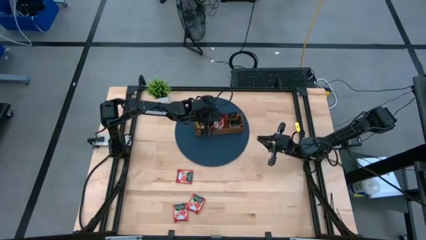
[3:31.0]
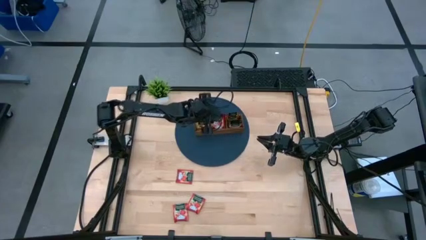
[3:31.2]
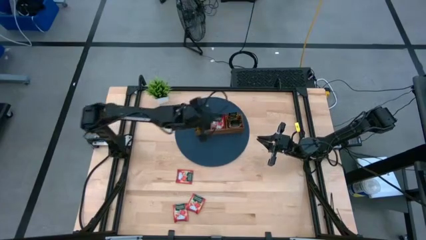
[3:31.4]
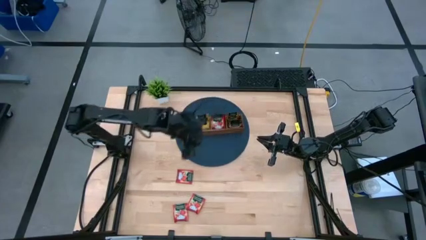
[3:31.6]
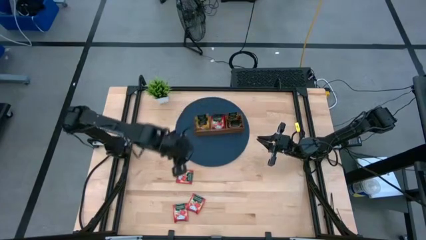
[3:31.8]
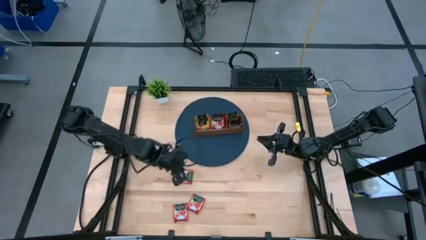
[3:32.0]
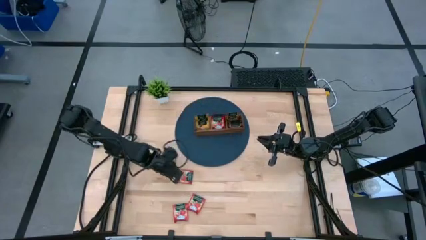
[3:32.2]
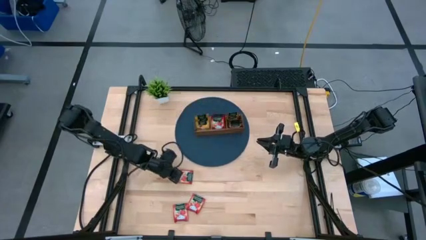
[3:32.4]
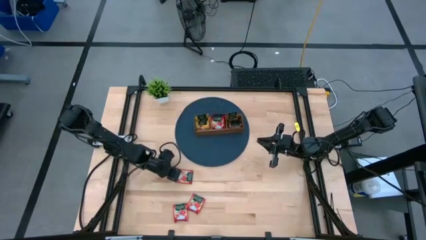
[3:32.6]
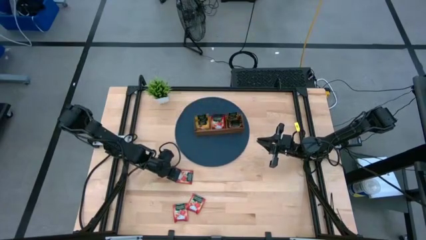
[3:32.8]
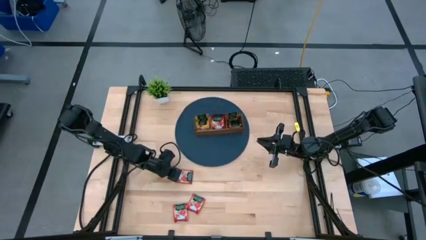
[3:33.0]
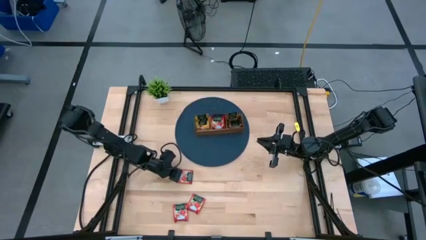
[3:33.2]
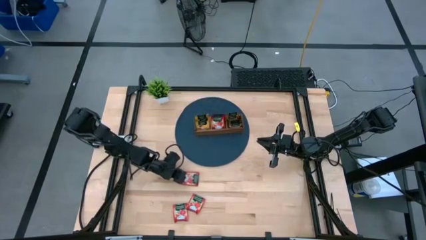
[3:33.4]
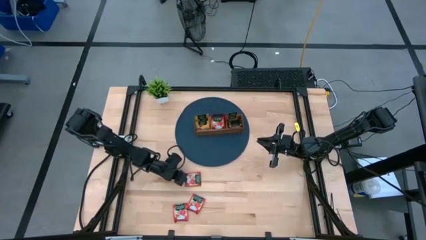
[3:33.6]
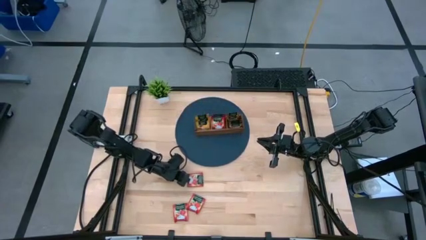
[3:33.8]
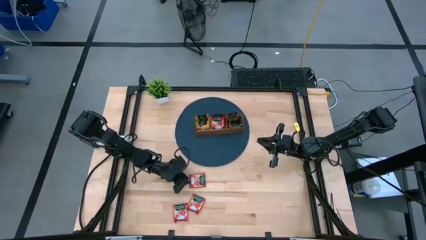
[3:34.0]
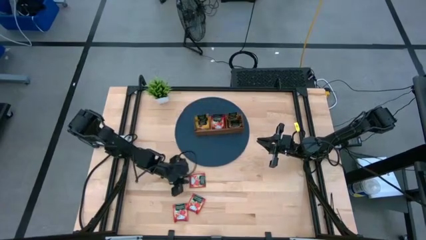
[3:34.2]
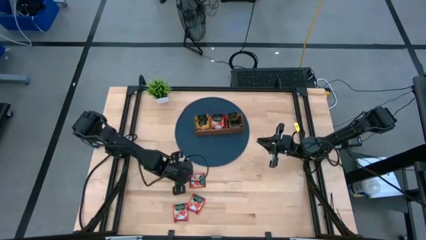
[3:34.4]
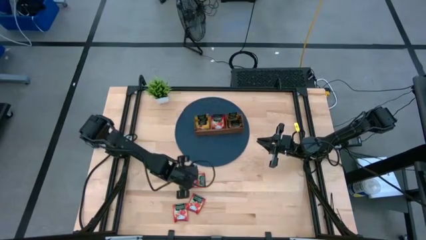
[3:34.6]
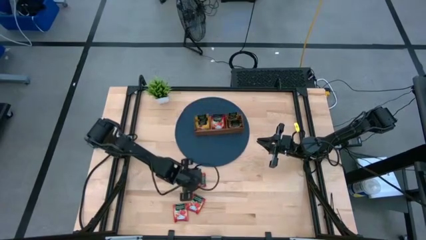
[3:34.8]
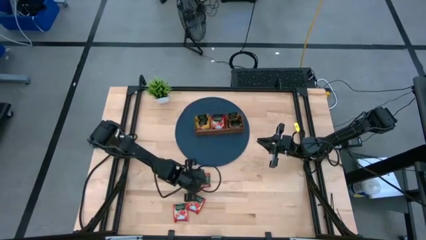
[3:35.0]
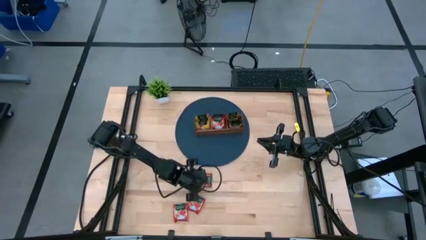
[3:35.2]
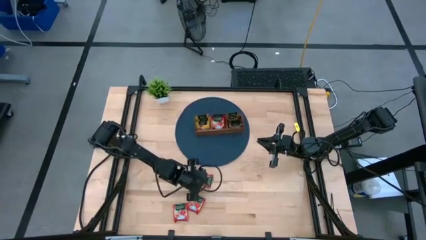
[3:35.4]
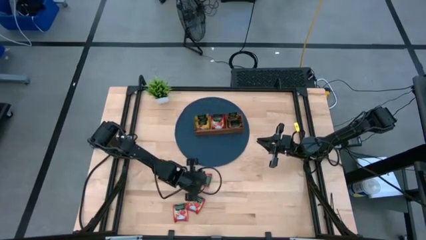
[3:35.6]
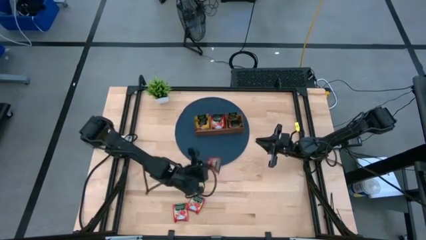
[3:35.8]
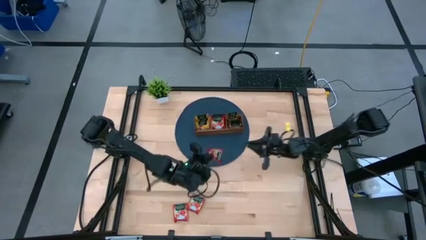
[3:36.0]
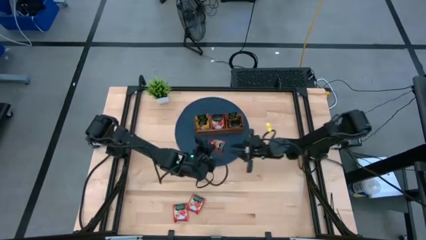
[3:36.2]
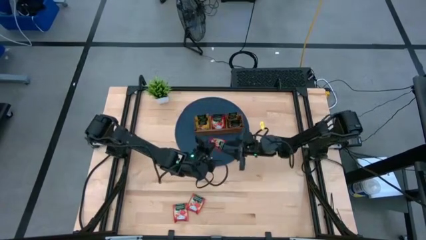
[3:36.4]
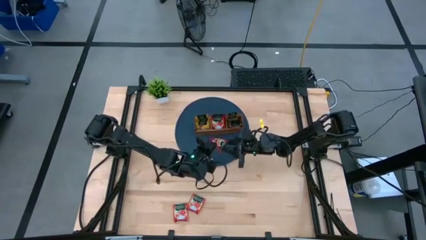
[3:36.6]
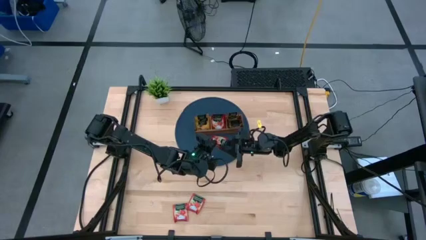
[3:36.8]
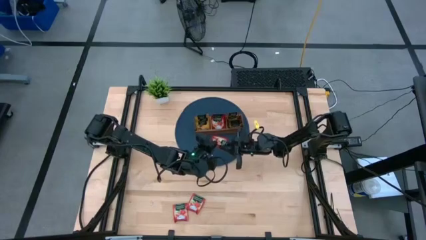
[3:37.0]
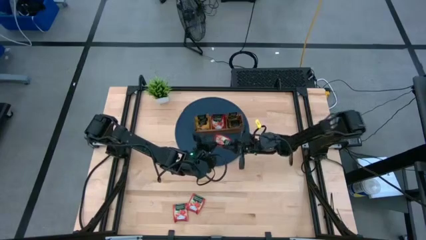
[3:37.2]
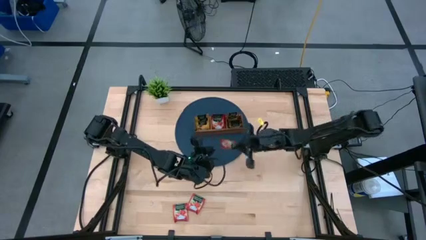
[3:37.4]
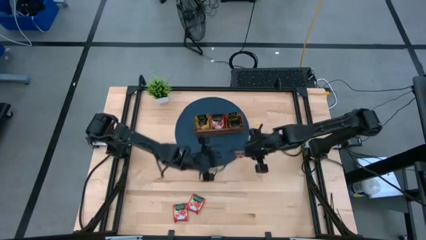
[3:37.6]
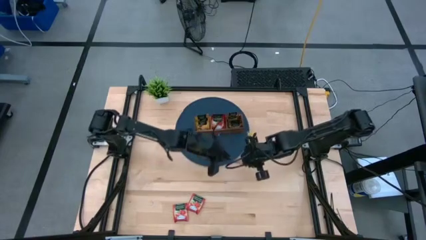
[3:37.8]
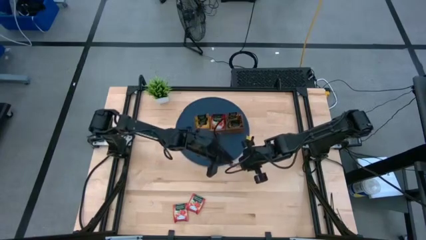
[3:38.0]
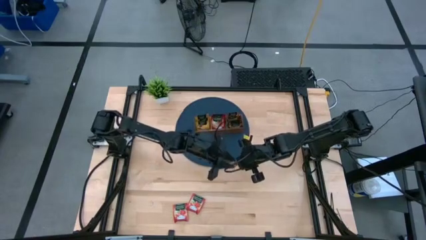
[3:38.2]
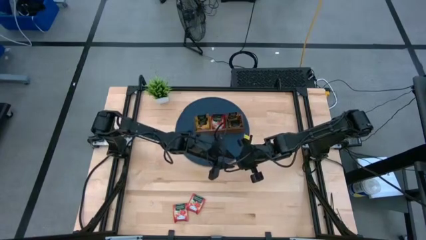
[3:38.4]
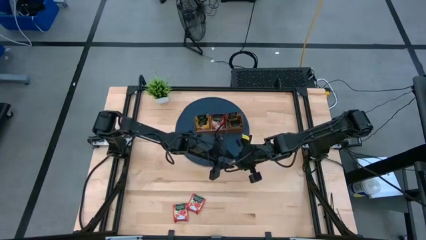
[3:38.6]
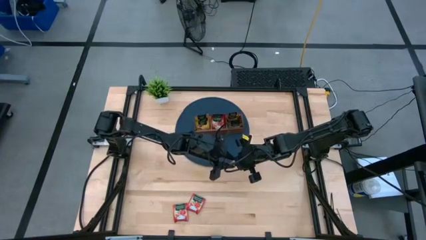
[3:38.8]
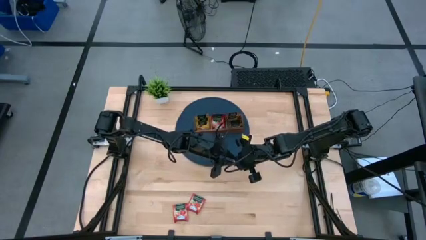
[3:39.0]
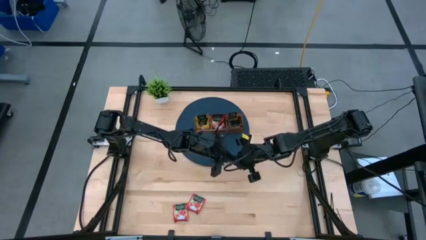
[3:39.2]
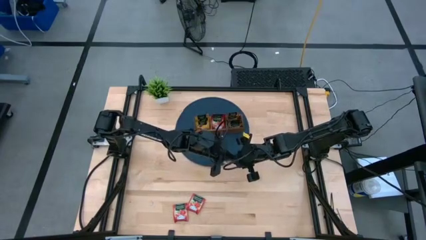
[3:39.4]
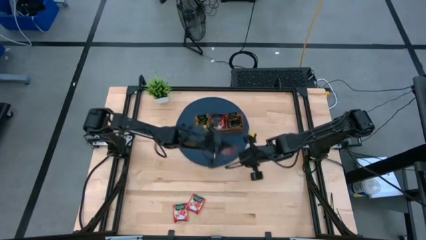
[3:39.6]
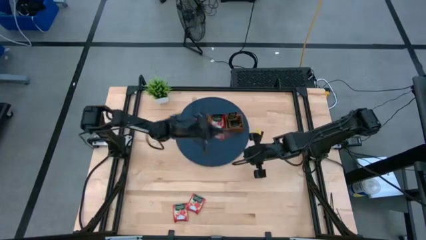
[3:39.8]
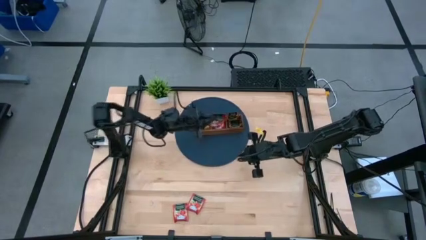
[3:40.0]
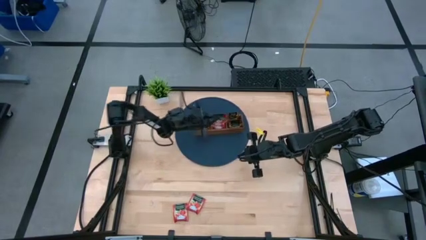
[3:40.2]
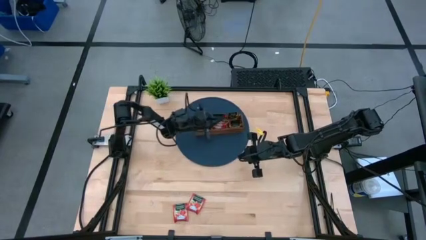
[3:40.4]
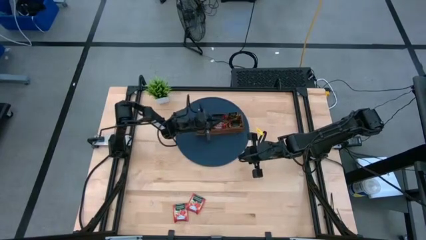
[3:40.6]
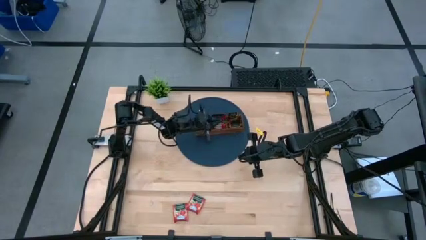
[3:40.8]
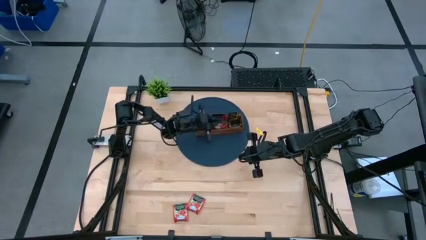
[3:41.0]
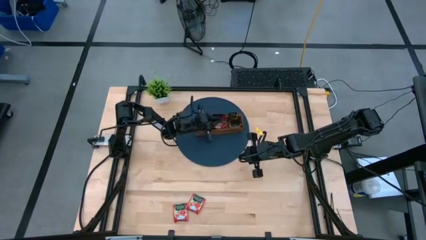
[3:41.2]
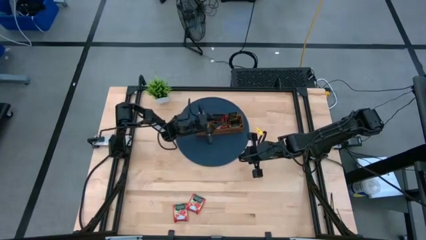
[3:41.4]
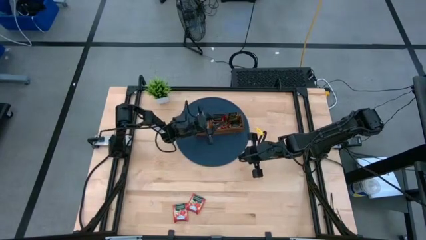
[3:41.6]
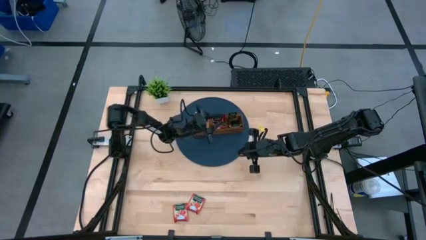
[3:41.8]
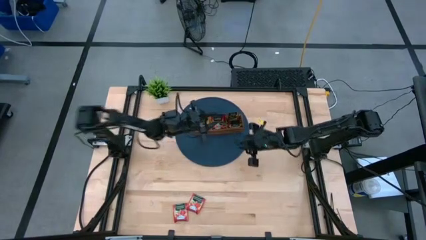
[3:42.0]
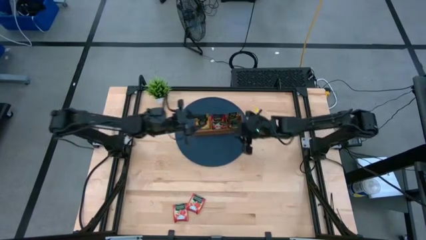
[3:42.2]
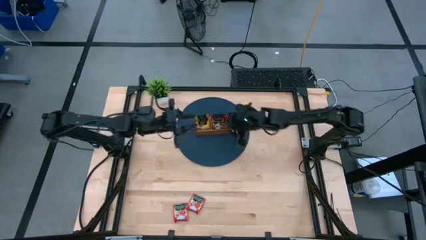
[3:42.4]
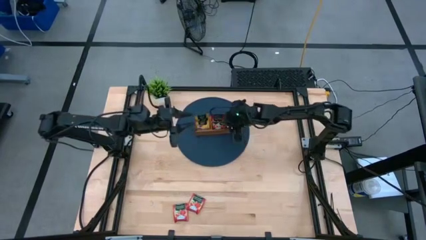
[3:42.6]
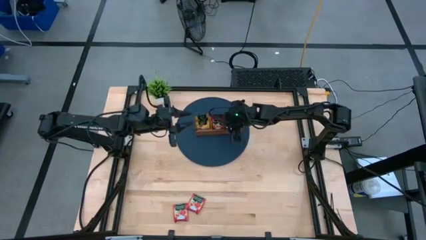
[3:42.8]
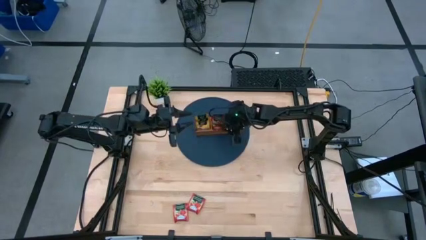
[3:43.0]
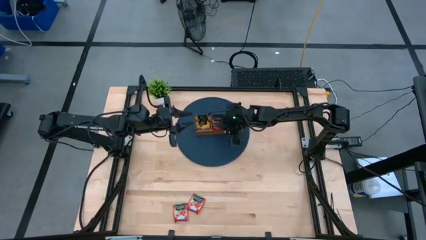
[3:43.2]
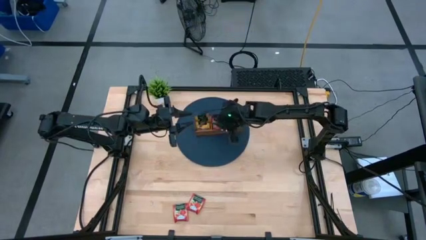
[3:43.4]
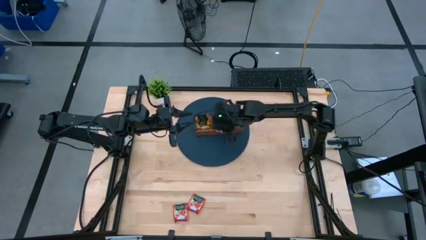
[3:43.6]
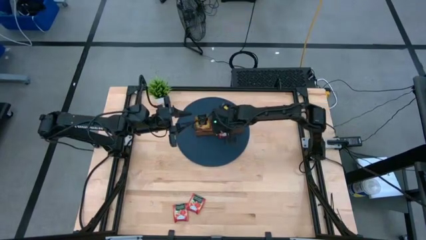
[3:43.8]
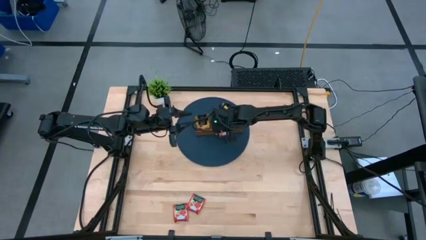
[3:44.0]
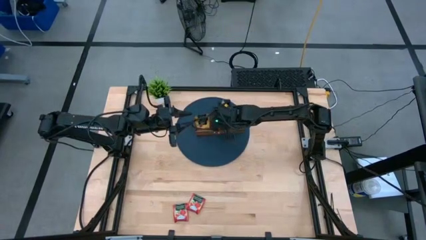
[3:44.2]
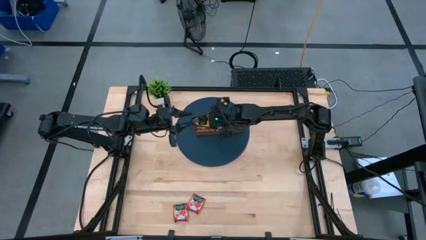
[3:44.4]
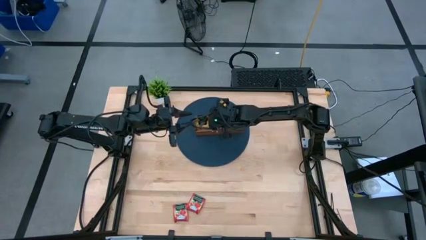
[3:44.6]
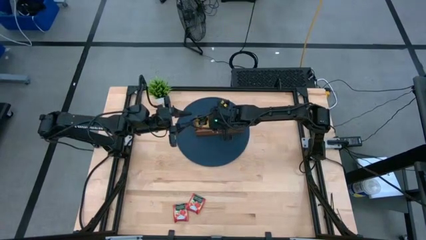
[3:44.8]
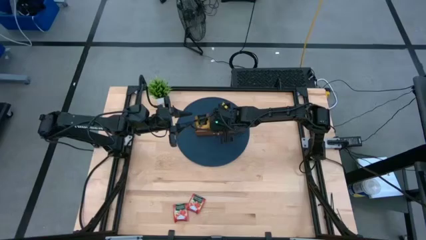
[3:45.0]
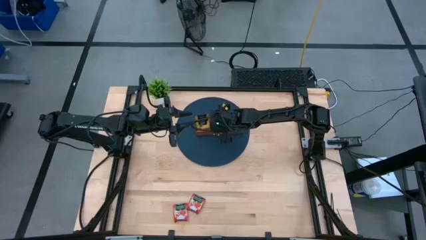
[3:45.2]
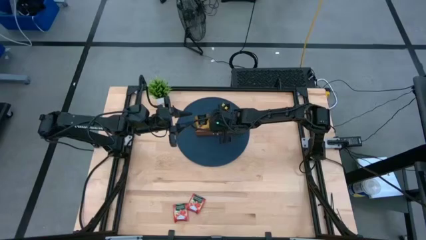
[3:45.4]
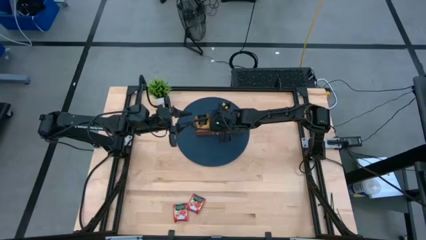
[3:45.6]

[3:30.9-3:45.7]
Task: Pick & Place Tea
Put the red tea bag into the middle section of the wooden organizer

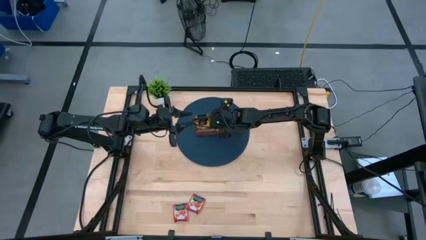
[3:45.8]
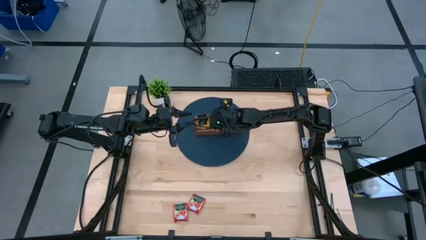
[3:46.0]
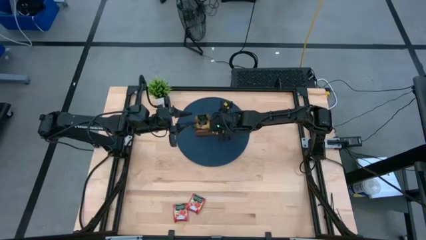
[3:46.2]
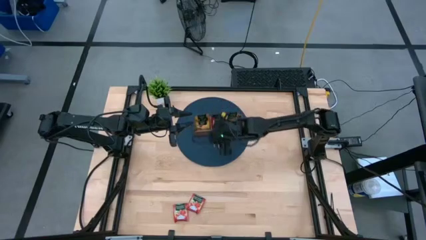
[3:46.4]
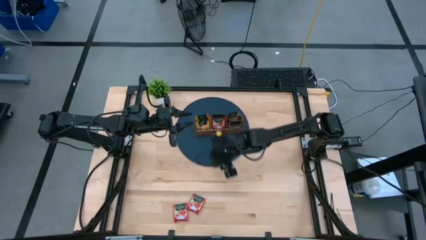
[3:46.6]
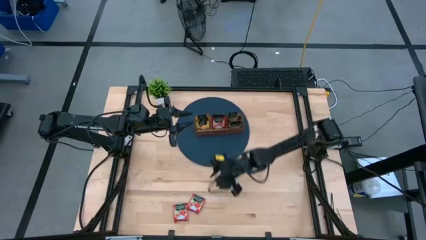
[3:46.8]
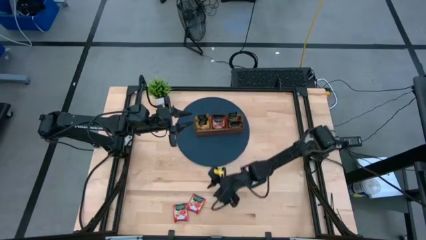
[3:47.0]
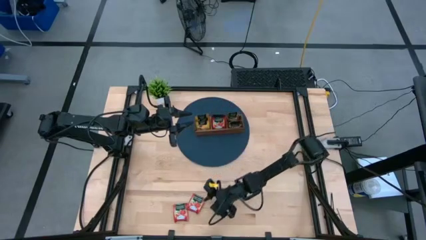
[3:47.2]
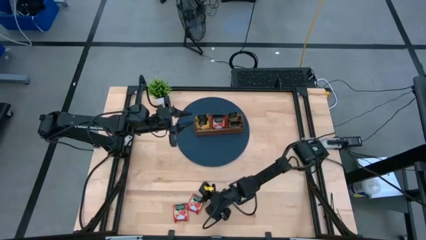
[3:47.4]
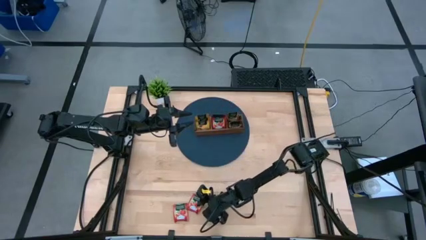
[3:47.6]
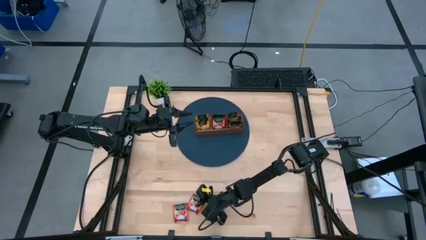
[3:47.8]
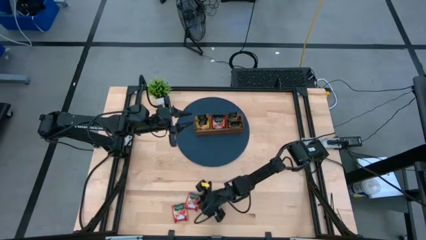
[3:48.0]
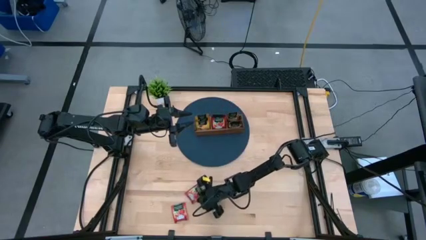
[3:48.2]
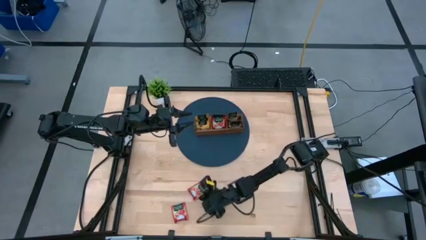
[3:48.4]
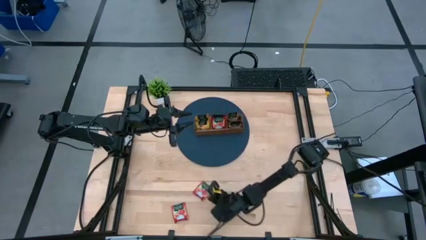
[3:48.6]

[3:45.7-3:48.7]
Put the red tea bag into the middle section of the wooden organizer
